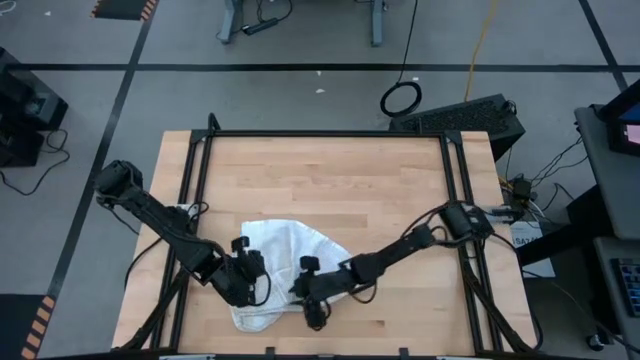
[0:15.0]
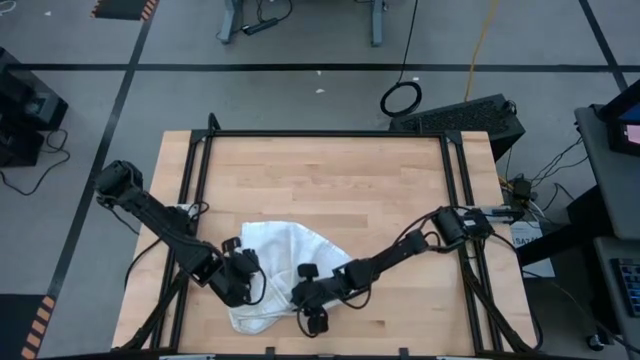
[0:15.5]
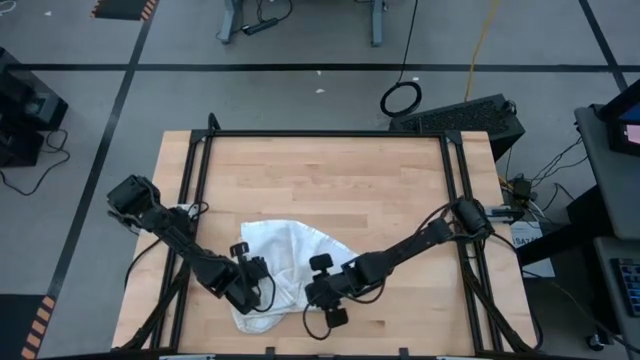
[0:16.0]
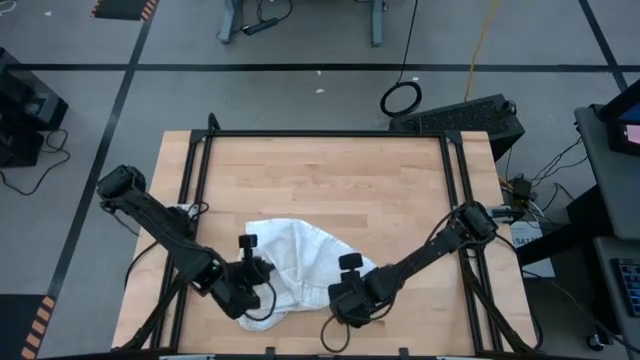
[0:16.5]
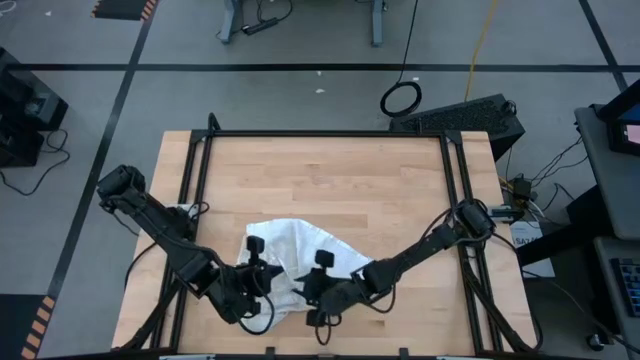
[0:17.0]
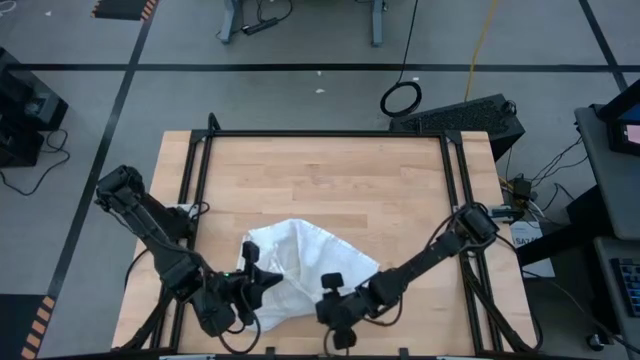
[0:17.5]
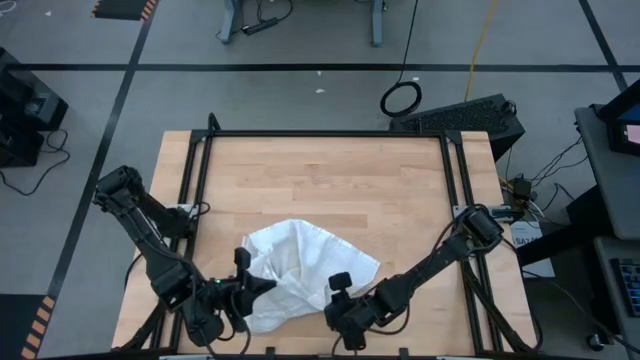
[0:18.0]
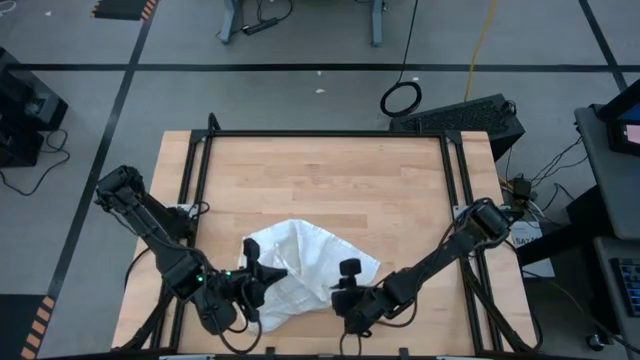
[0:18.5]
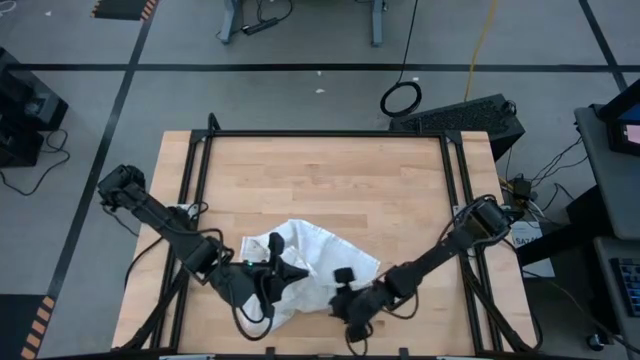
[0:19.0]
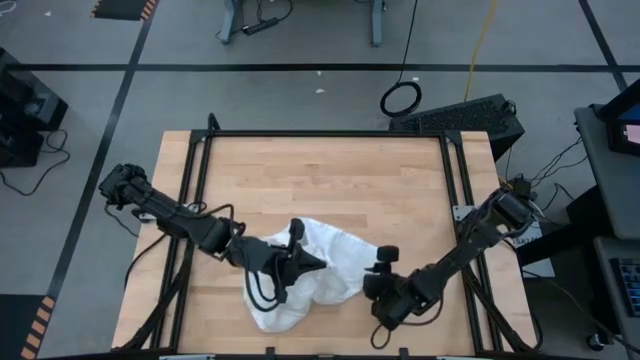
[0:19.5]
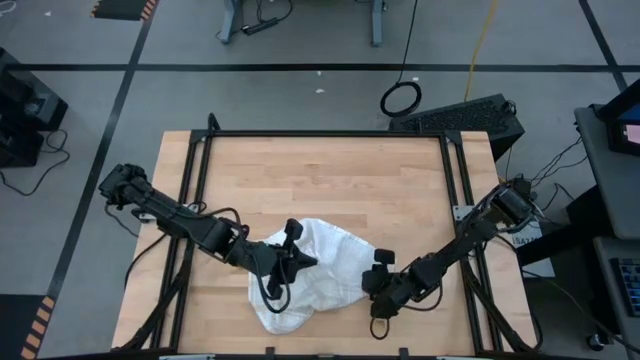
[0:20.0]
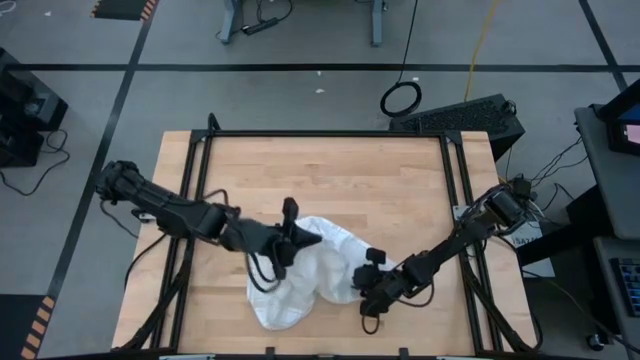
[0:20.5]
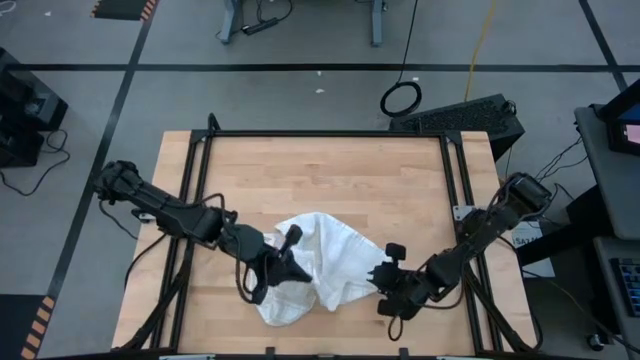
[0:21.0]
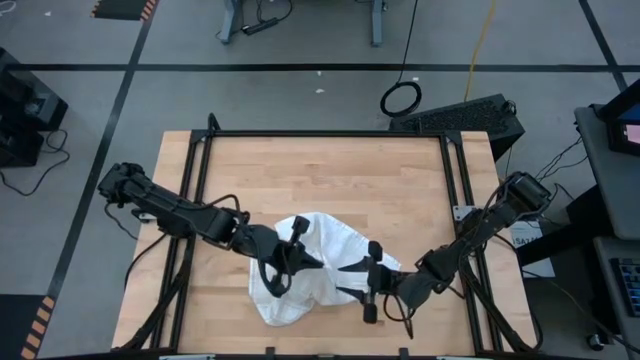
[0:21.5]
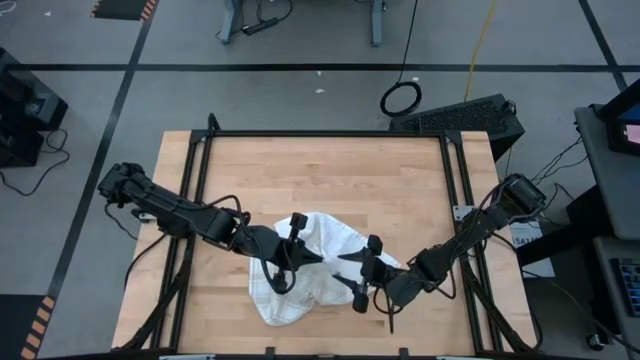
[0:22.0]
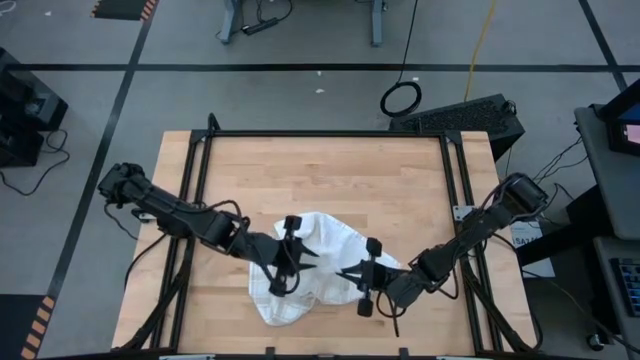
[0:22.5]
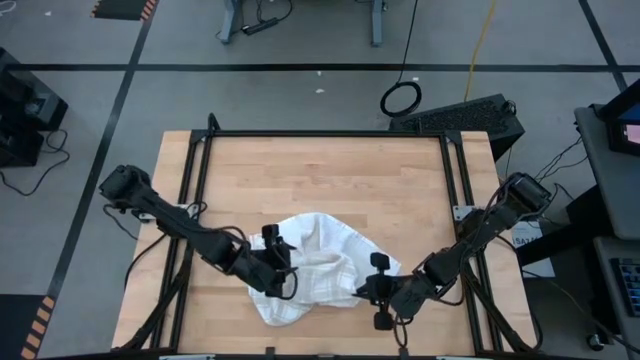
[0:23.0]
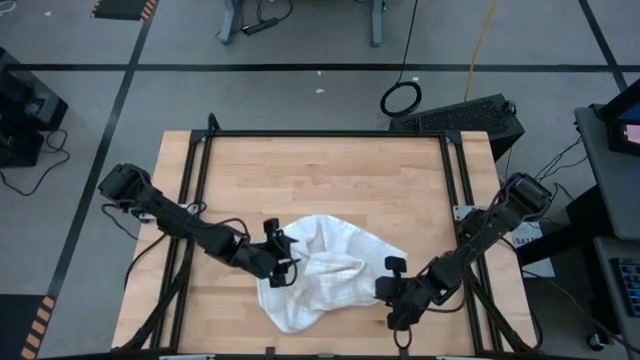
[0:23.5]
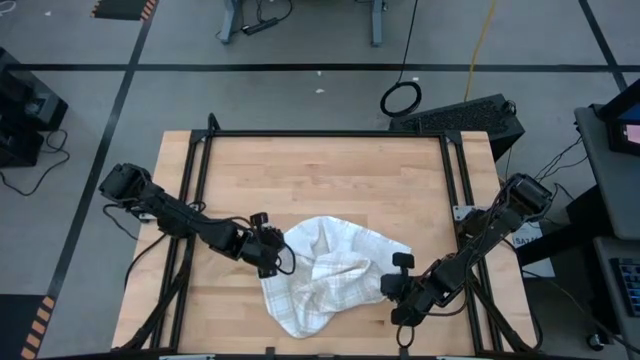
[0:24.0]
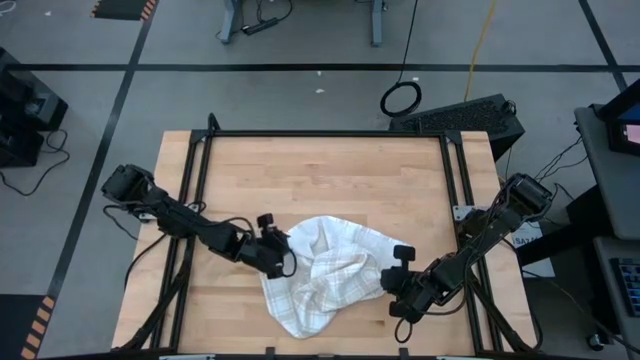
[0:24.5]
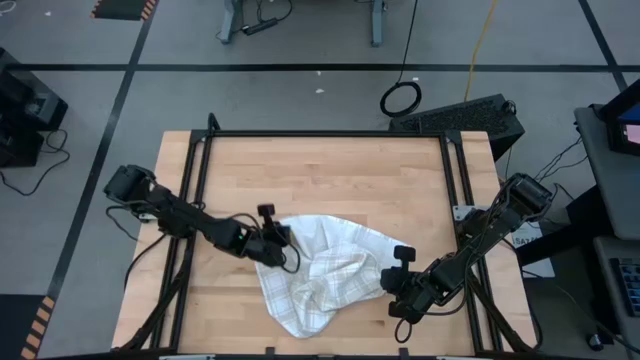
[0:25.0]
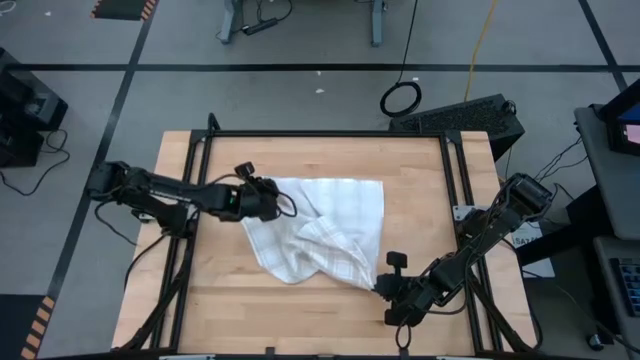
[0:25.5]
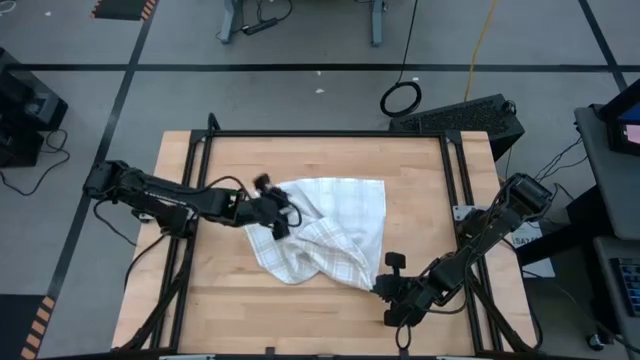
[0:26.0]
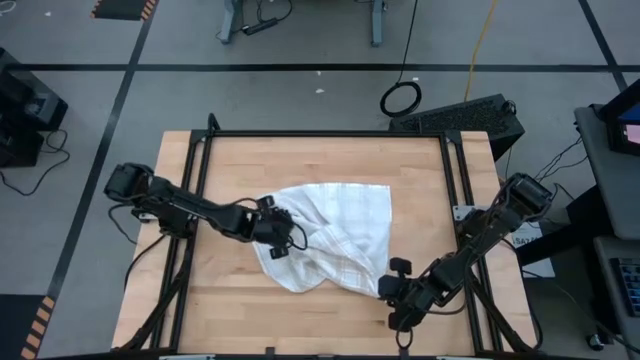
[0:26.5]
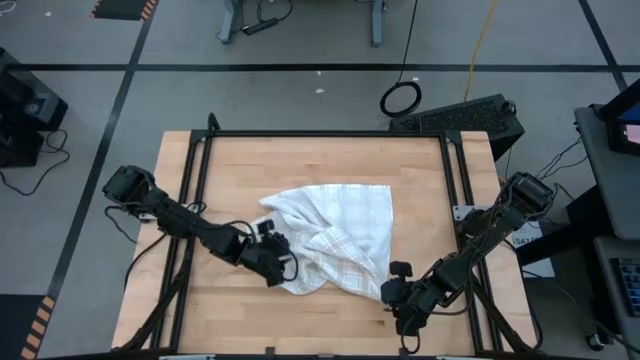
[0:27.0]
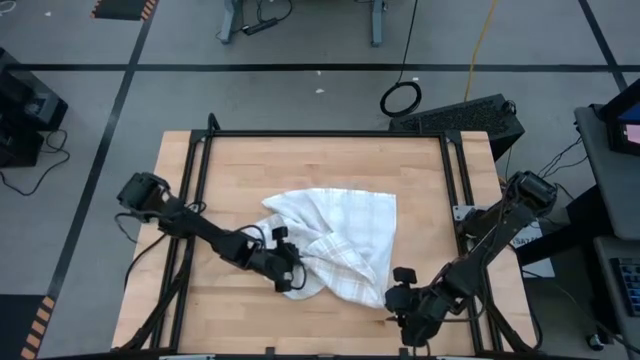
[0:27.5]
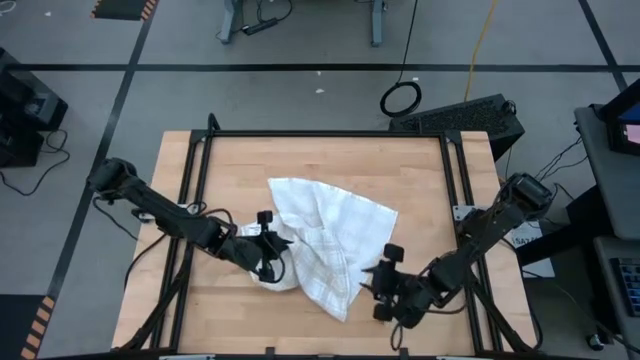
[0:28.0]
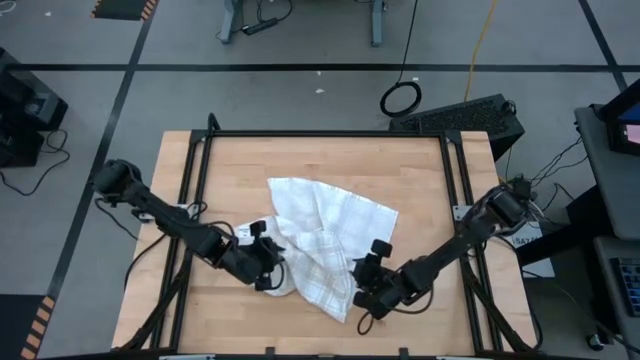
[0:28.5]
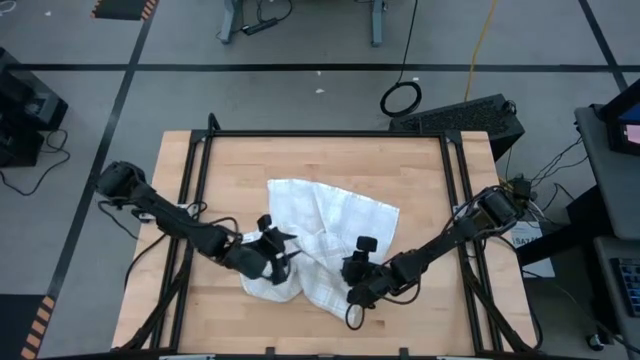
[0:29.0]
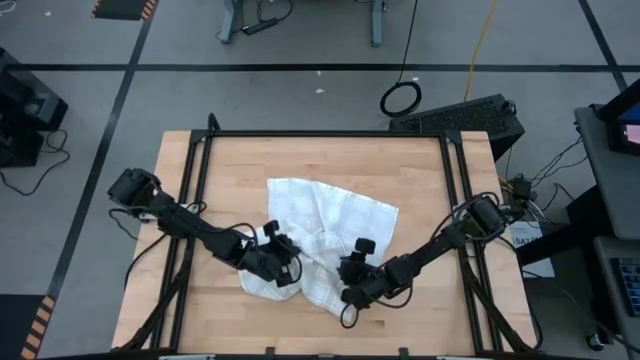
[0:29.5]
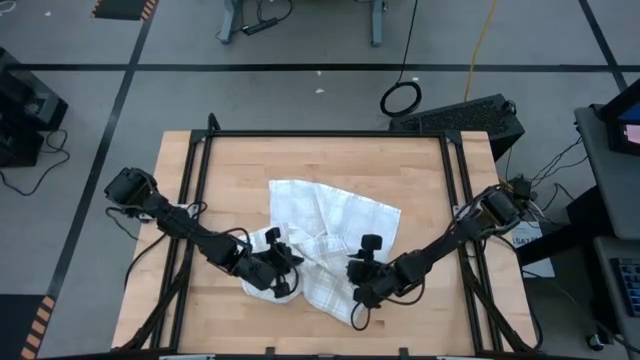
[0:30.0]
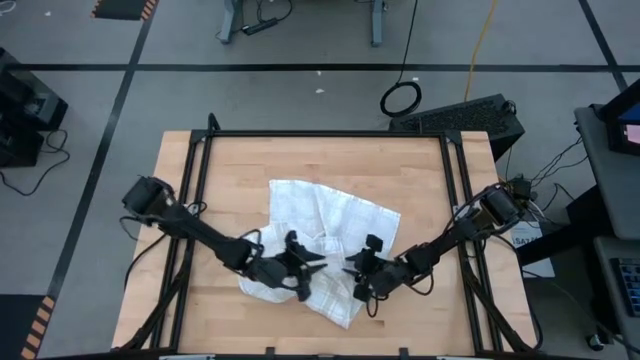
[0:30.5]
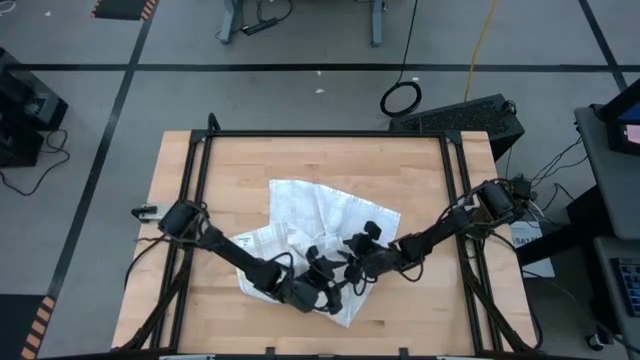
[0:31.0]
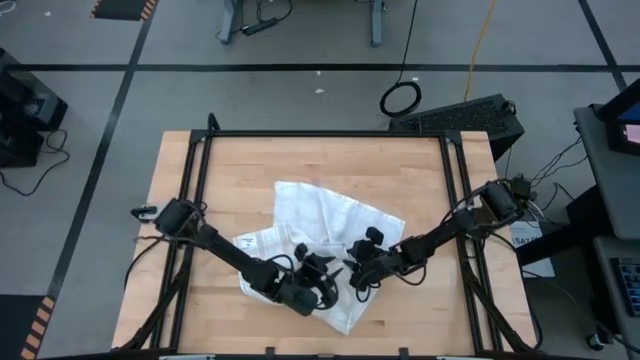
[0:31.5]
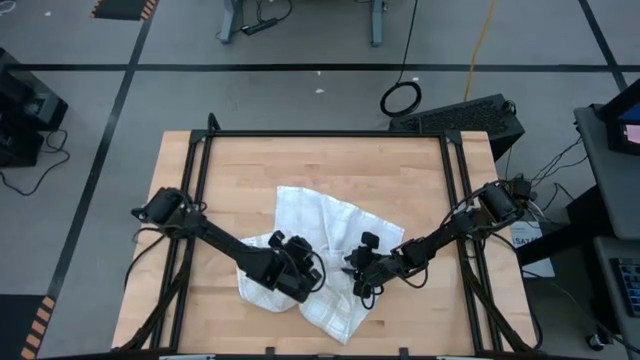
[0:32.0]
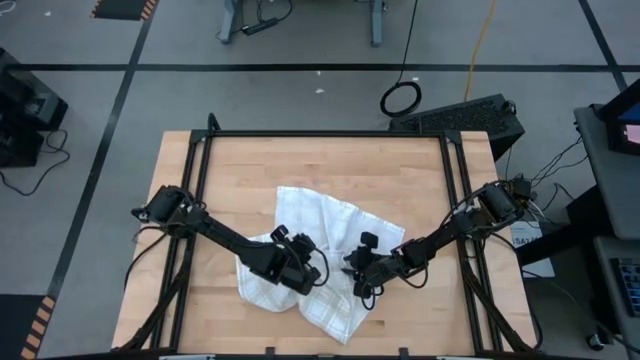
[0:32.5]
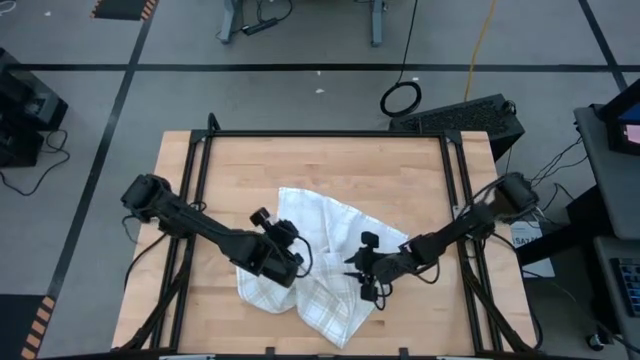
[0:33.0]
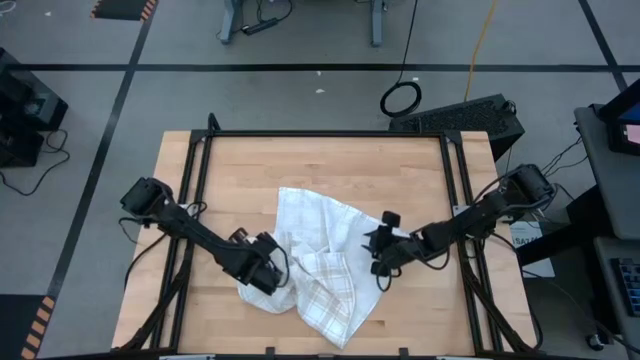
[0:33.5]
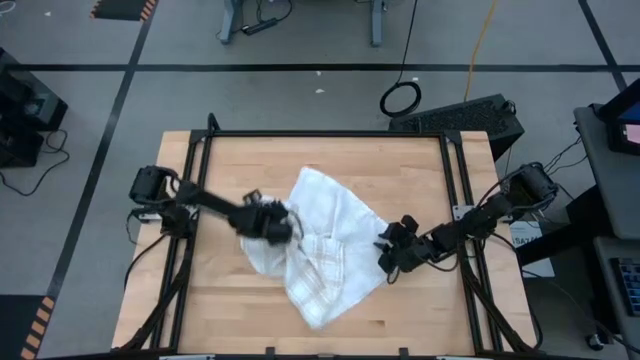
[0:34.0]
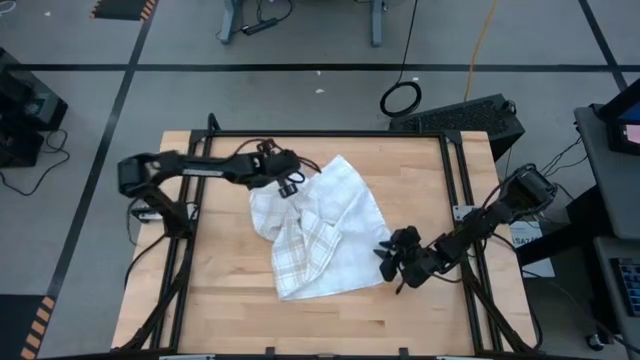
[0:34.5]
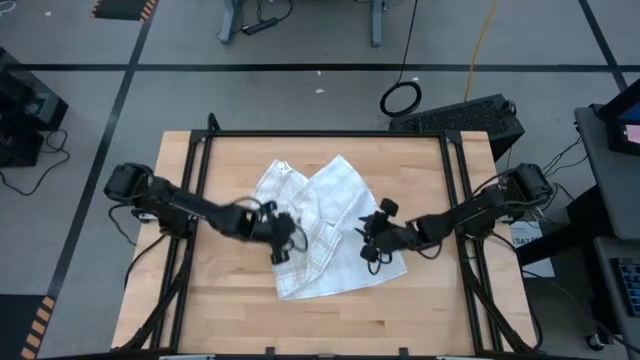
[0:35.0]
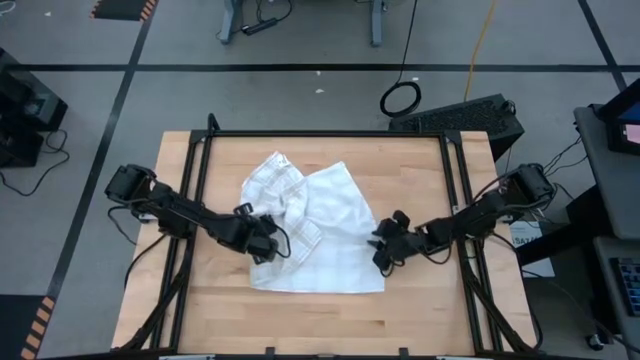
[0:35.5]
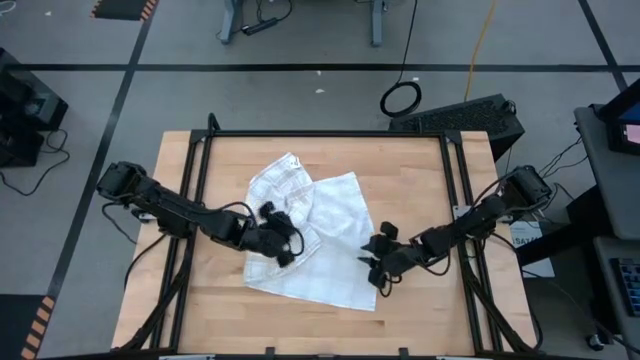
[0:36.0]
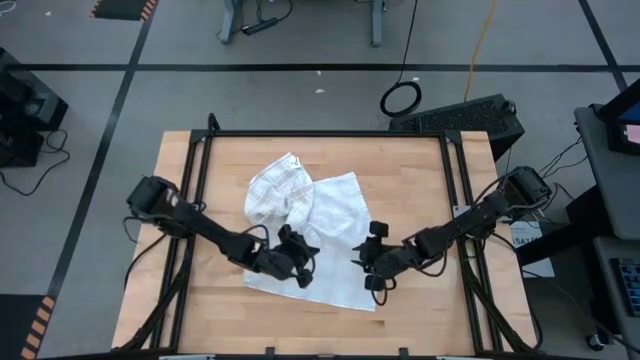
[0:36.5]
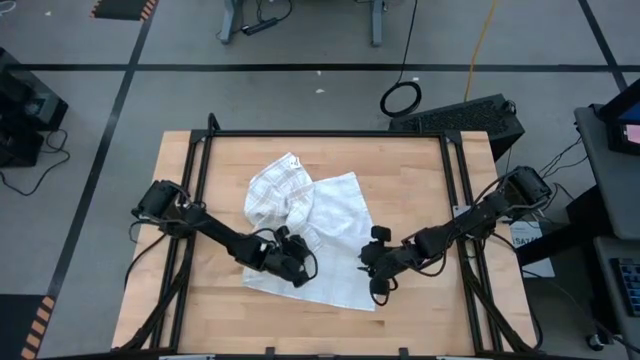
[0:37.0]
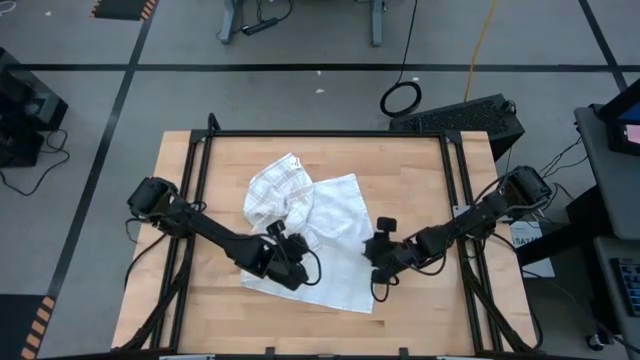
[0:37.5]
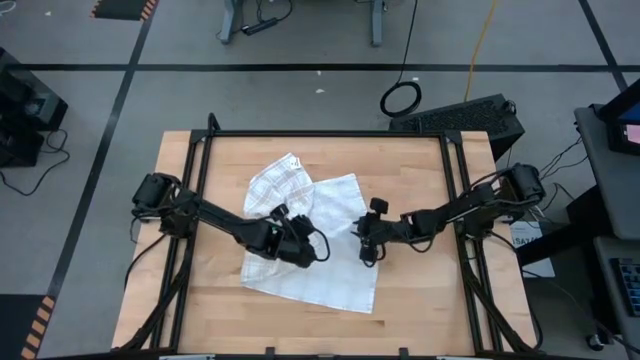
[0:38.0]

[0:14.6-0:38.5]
Task: Roll towel
Fold the brown checkered towel
